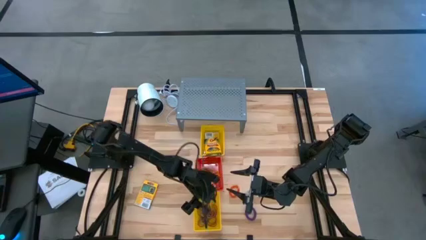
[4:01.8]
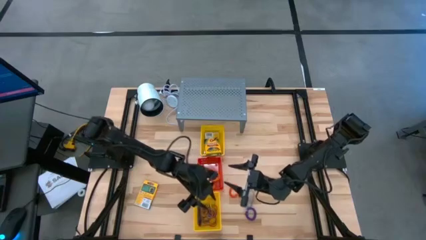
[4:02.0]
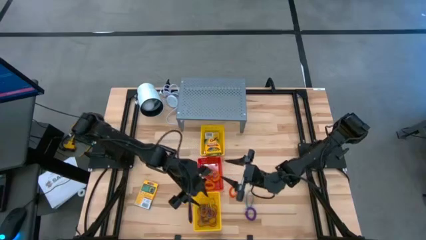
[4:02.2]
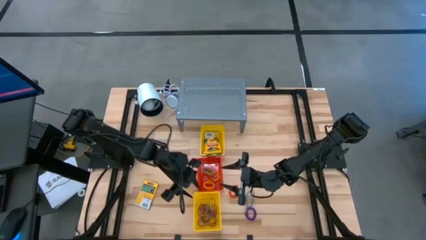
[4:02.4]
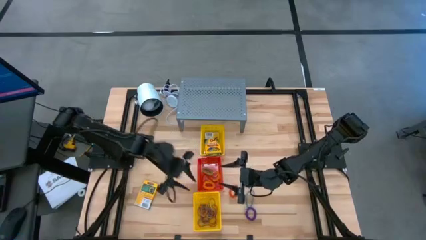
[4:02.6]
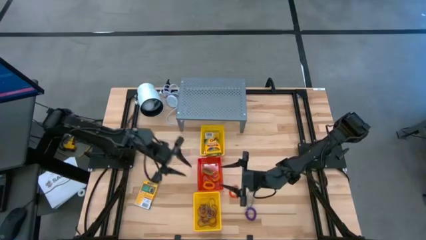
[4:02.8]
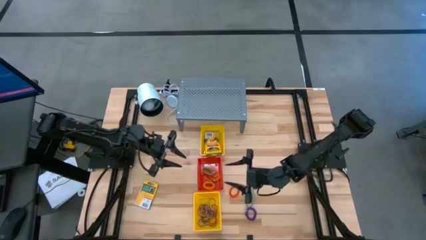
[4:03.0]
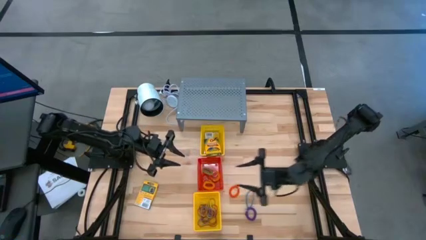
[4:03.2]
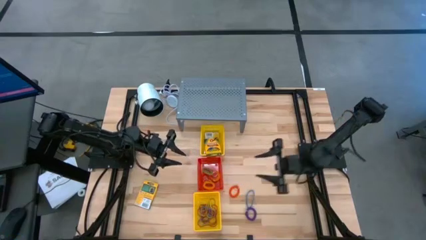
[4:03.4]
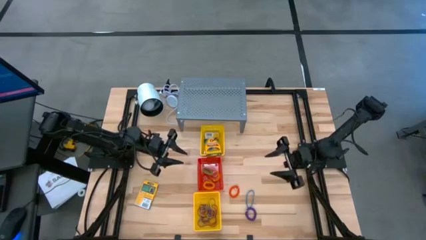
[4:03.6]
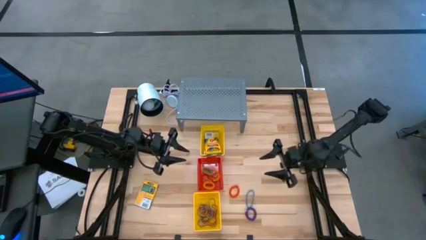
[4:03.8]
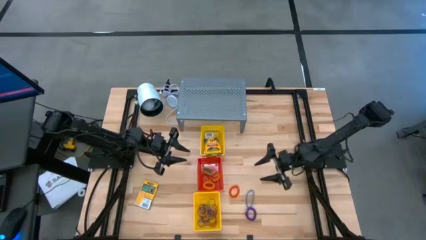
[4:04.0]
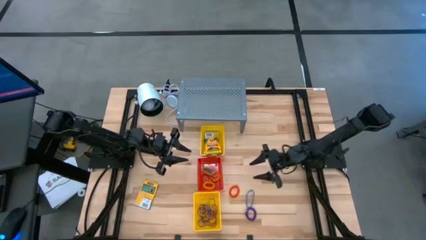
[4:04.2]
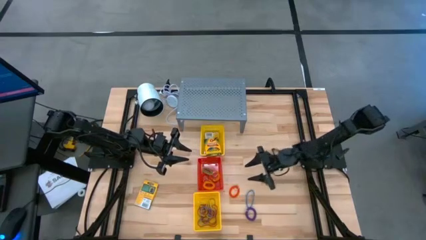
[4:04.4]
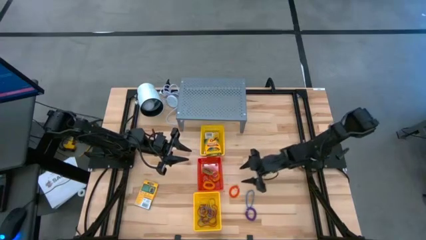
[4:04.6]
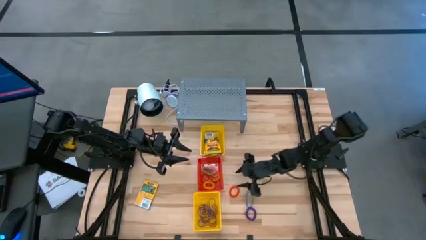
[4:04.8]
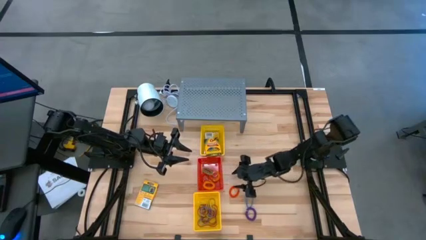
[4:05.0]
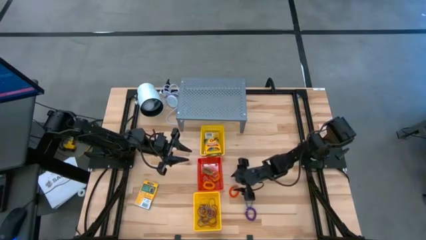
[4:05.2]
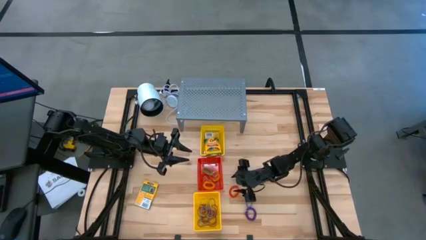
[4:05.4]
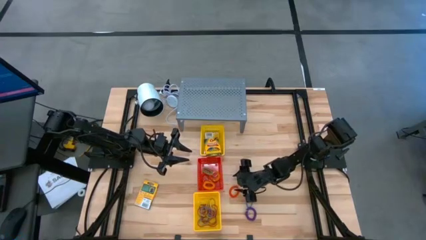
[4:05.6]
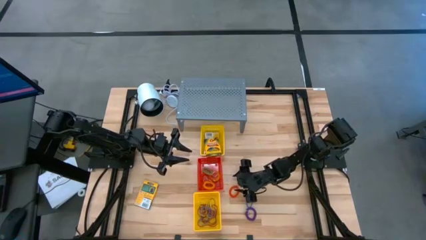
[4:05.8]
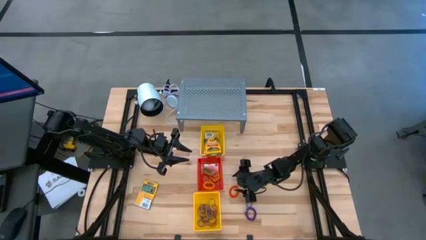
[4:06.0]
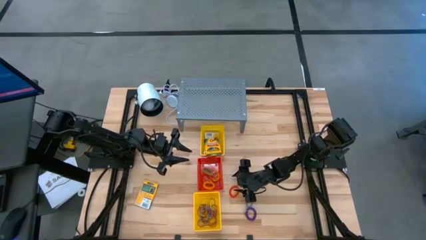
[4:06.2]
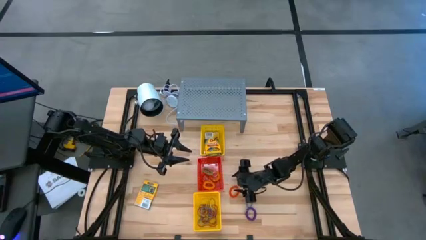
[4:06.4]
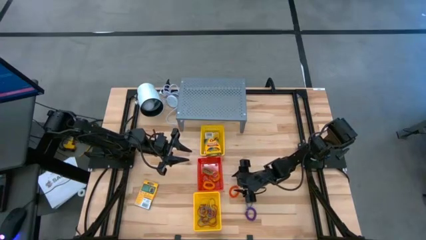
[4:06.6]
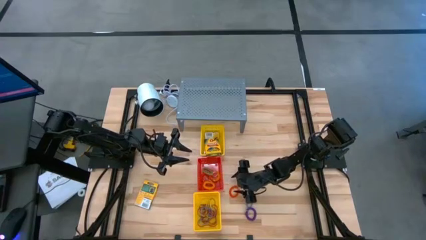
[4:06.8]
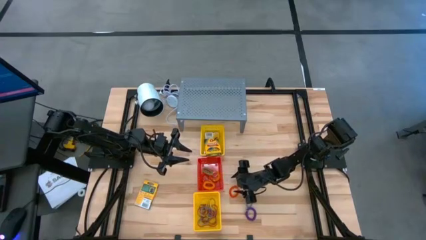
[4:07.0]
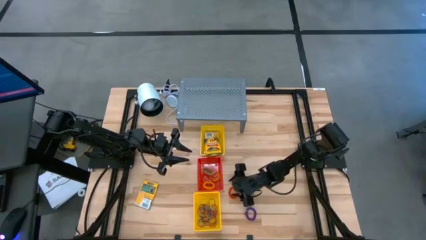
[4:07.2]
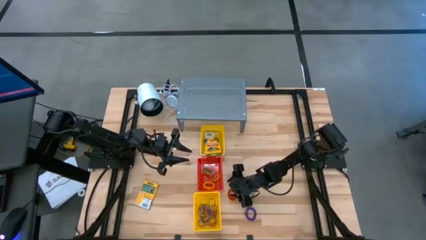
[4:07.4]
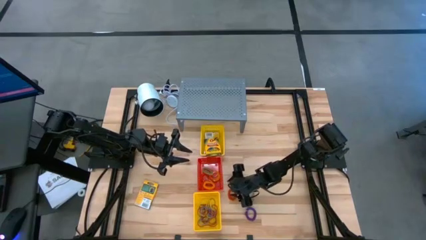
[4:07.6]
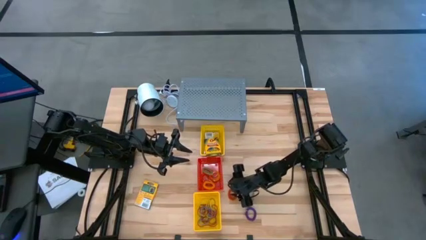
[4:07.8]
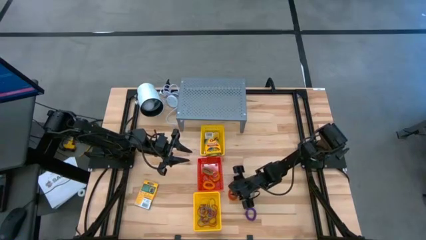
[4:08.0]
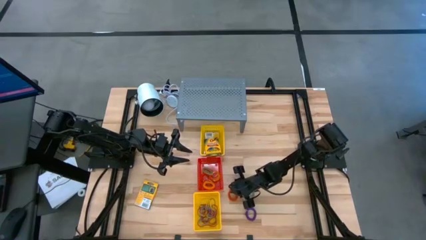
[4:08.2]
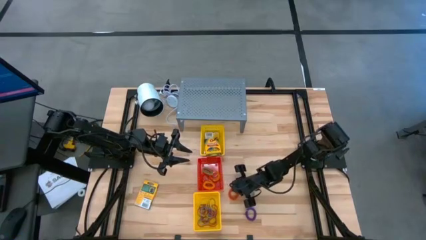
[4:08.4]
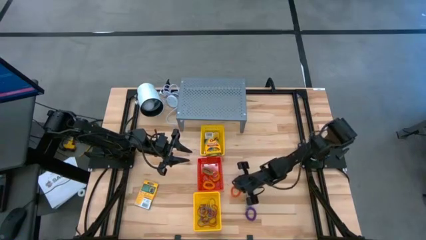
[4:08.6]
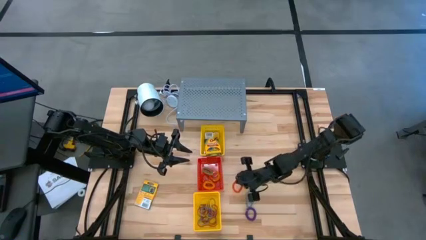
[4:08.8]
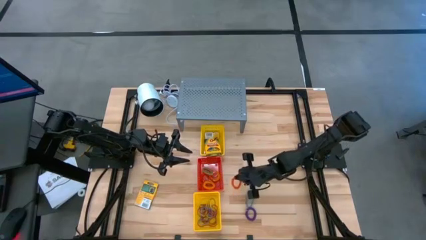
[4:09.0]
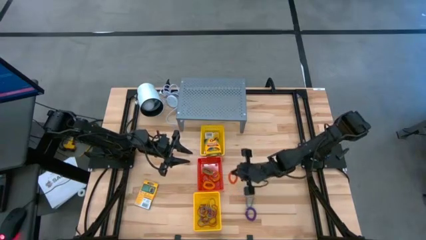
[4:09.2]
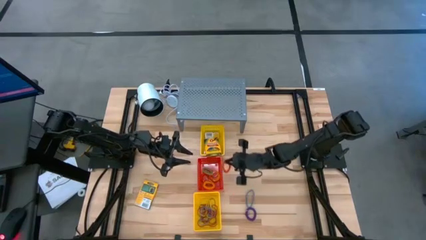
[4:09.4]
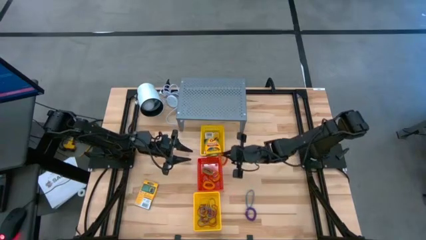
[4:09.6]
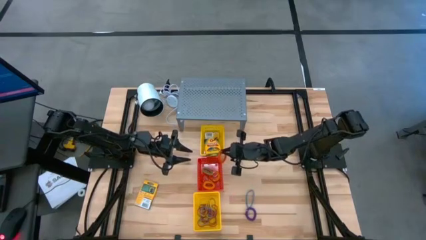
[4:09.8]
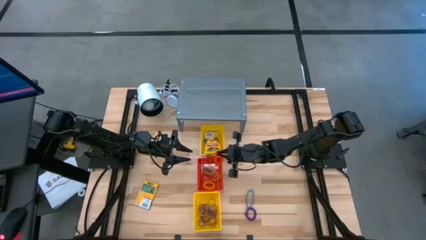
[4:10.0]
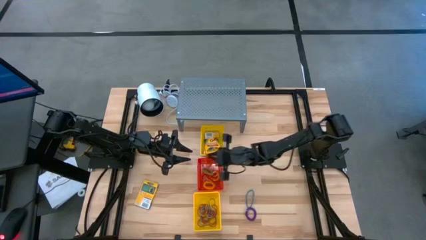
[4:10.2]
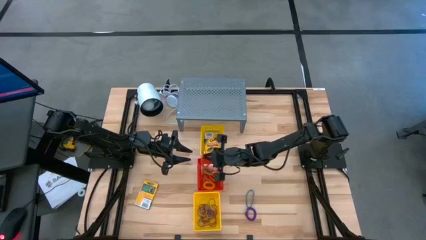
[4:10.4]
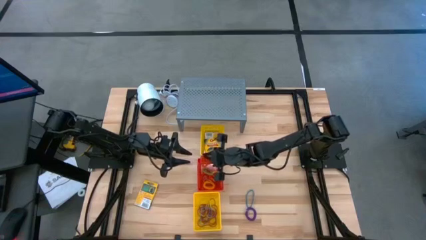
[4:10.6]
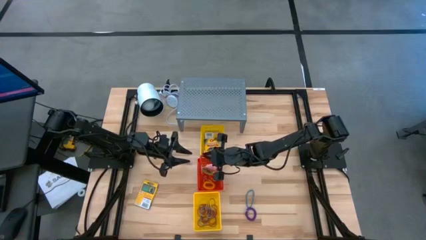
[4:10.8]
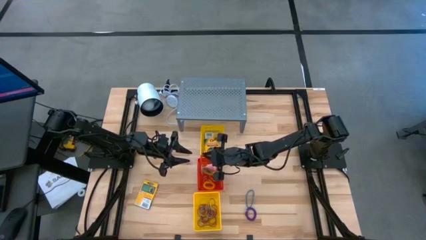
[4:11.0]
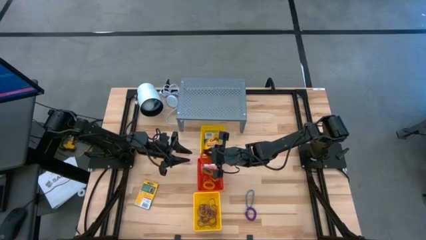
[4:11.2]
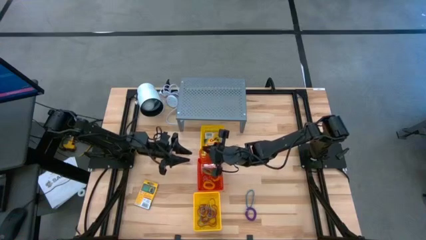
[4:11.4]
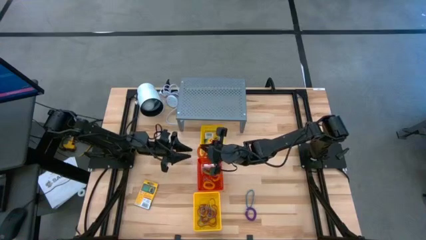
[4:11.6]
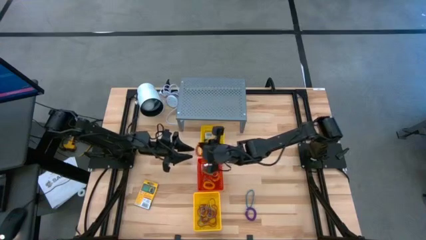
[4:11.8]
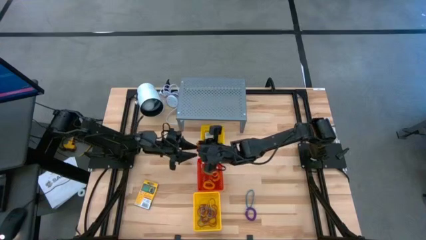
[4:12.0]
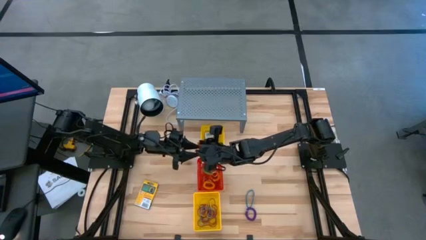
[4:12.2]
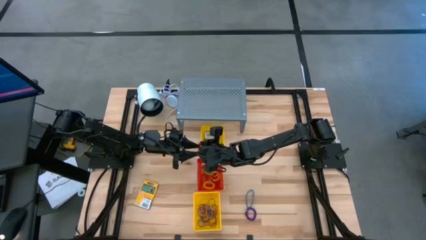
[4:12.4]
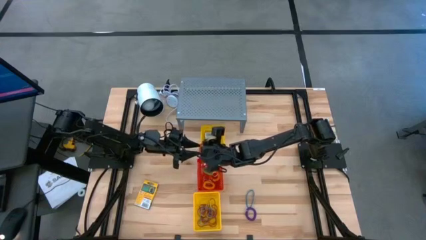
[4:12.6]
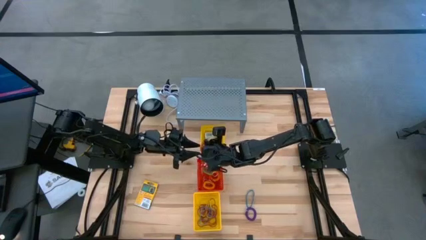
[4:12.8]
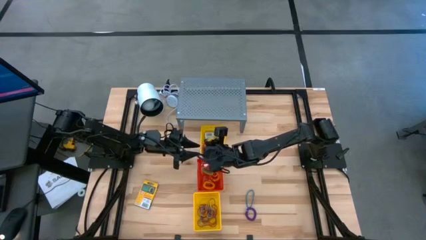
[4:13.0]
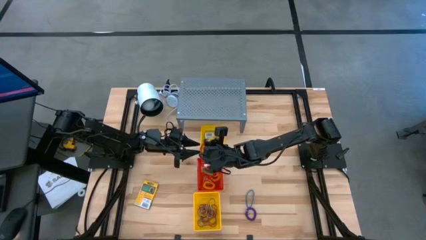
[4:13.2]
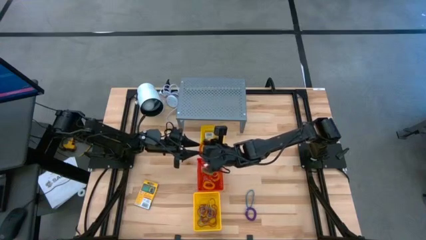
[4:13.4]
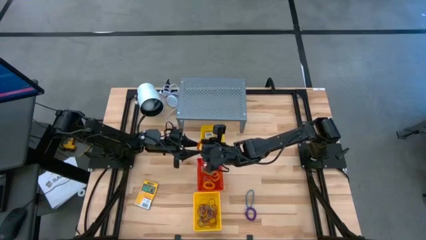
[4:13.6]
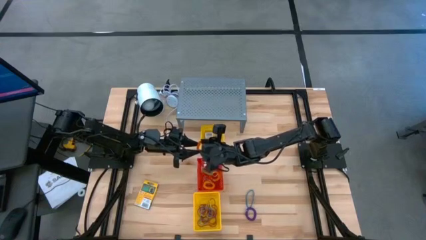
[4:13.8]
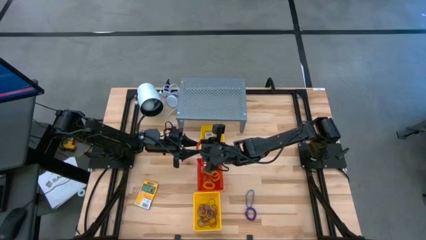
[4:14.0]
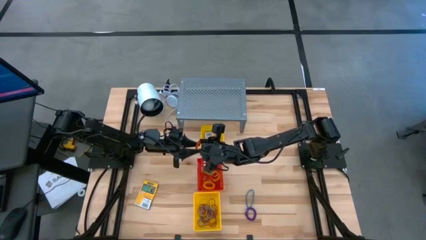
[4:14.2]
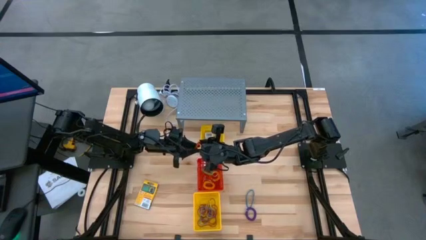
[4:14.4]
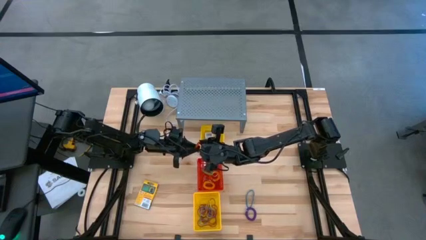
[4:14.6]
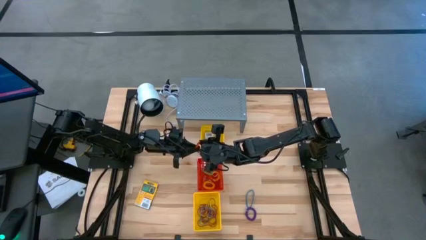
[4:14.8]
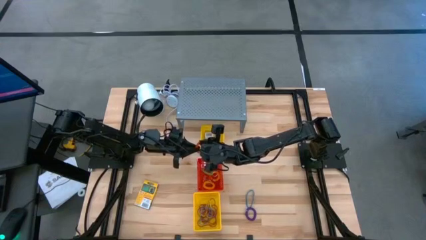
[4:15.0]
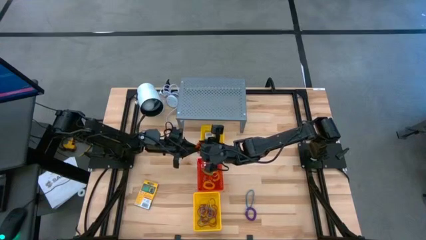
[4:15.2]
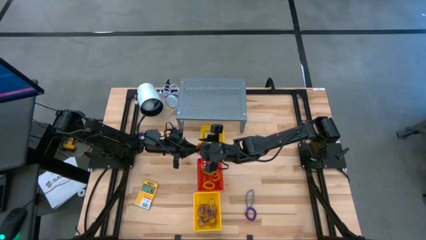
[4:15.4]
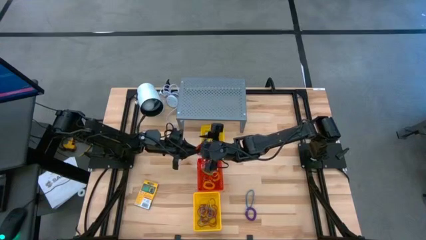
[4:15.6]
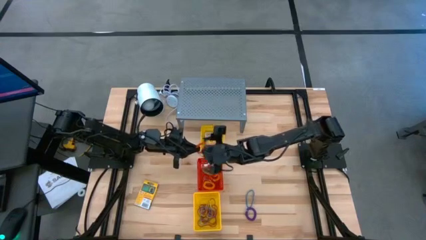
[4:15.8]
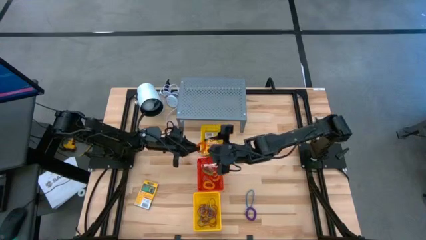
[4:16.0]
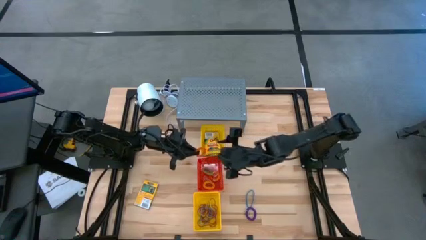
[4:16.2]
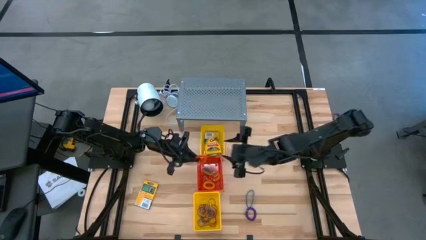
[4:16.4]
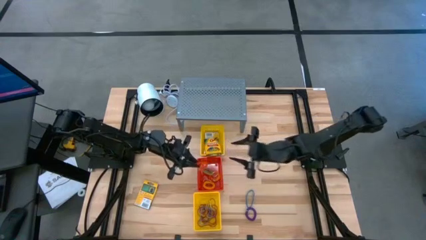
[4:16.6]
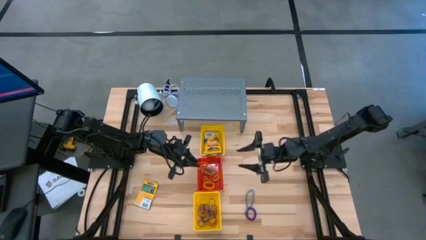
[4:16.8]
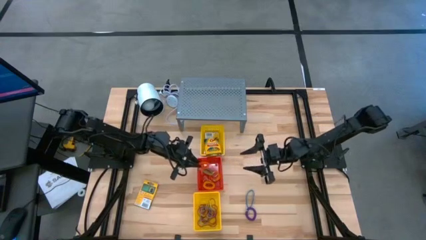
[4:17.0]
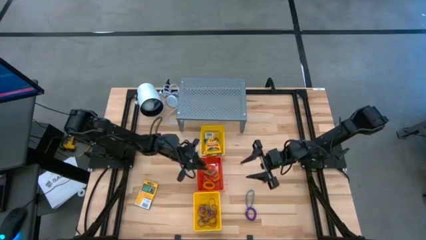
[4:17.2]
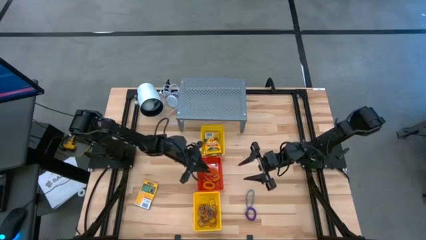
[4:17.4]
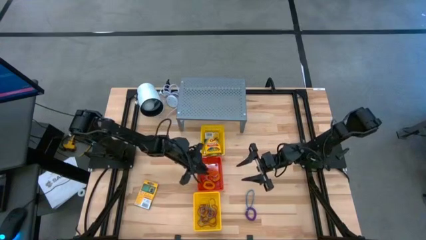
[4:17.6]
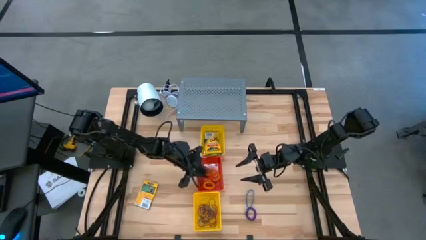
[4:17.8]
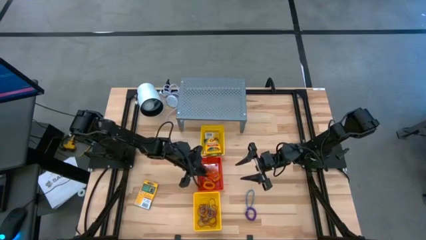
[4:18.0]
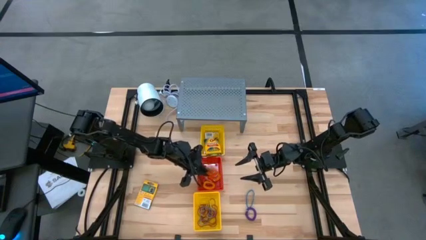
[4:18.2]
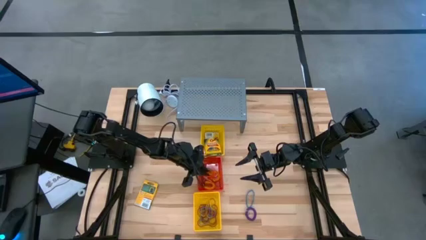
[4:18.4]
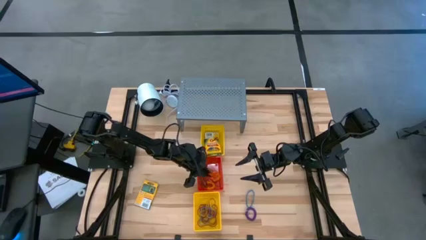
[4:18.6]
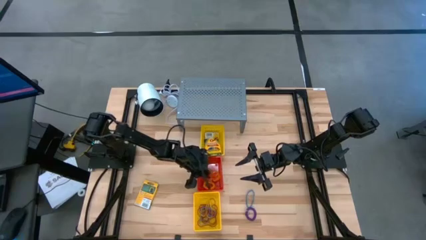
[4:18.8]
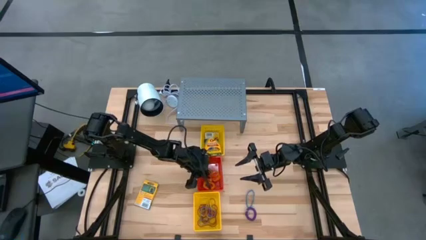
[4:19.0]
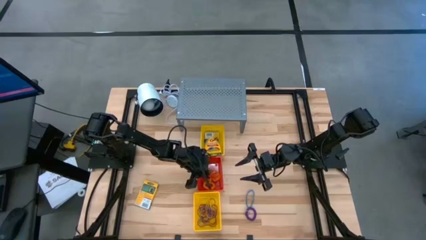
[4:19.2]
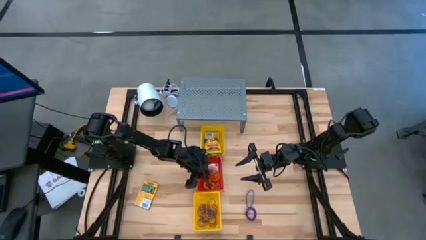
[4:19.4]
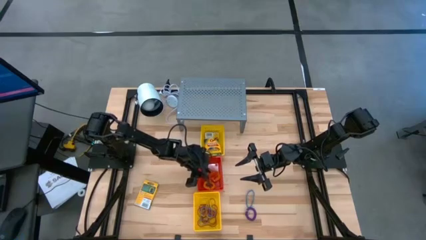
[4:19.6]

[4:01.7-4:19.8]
Task: Pick & Place Office Desk Supplies
Put the orange spring rubber band into the red bin
